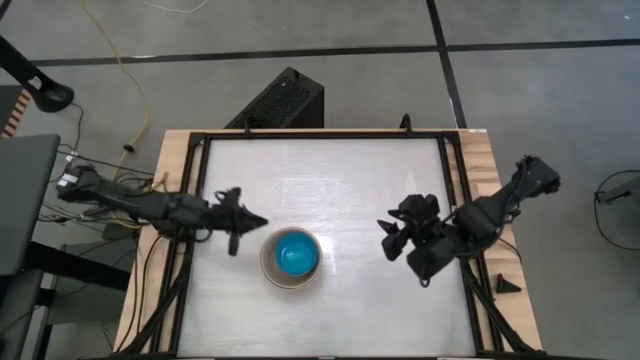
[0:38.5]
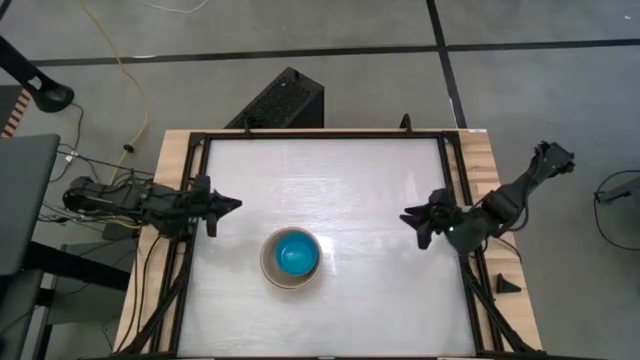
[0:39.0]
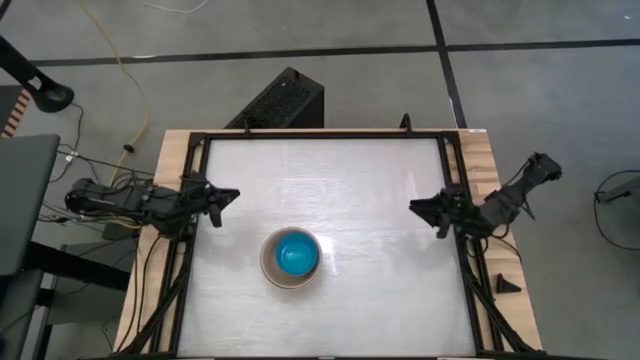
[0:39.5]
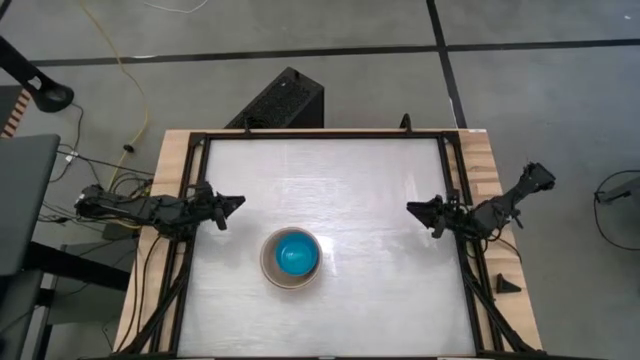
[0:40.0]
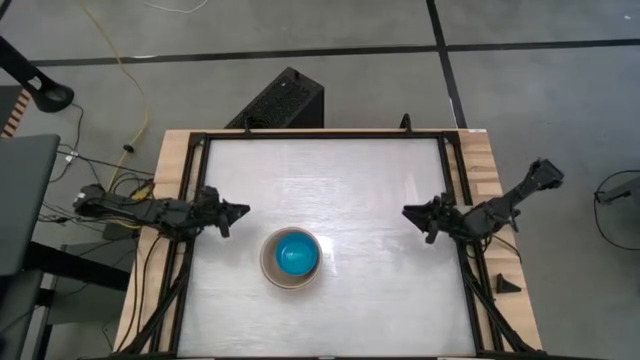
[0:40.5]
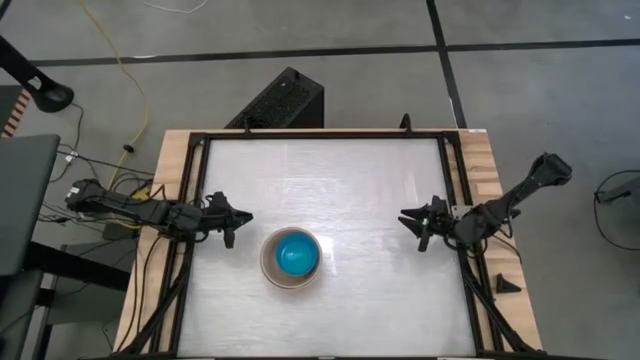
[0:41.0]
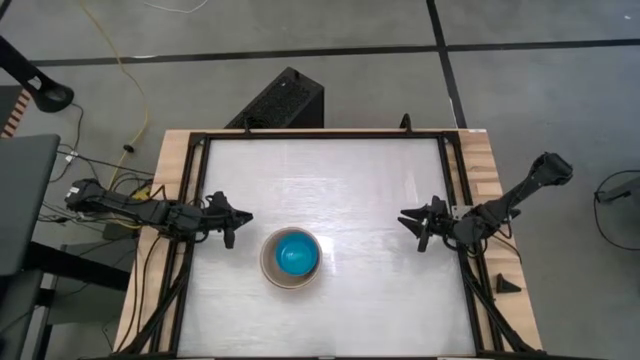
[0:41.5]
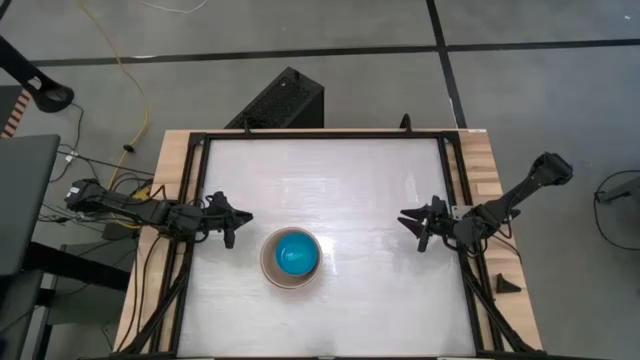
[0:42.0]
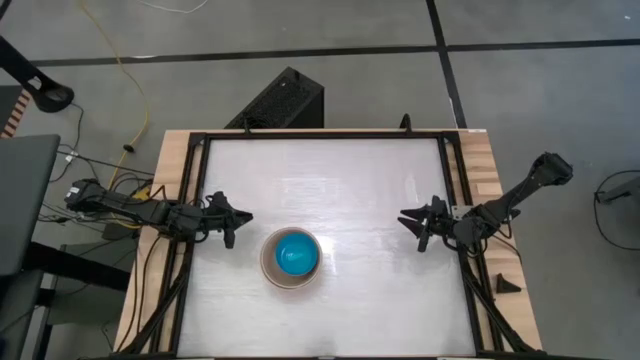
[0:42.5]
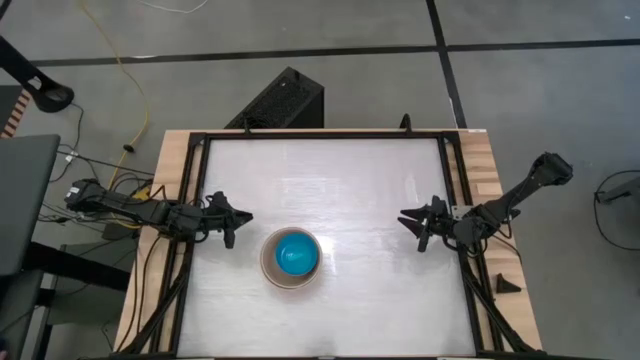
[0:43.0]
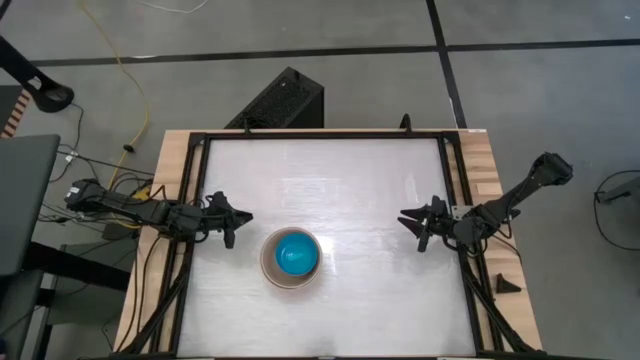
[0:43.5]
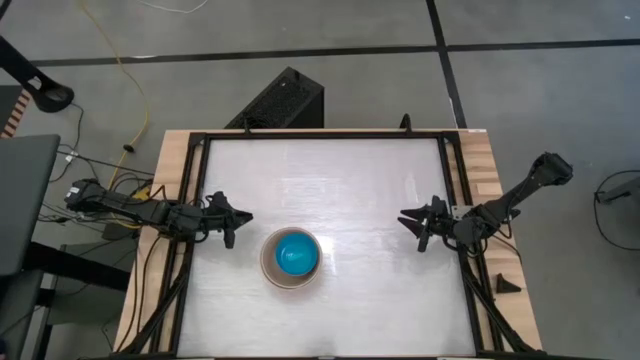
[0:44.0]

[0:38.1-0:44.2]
Return to Home Position
